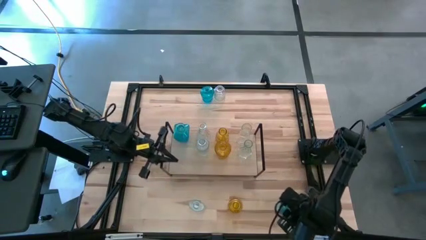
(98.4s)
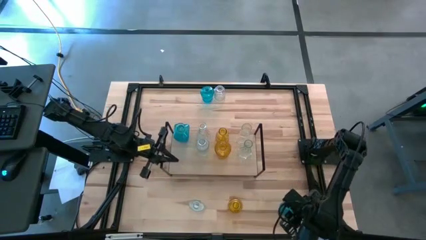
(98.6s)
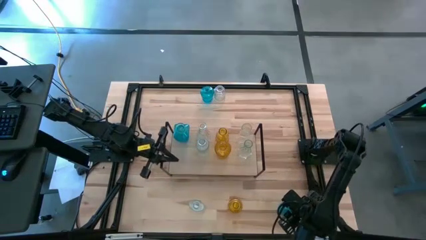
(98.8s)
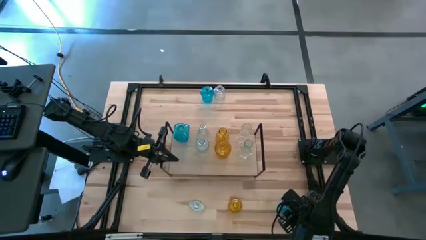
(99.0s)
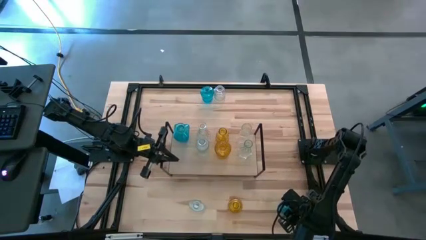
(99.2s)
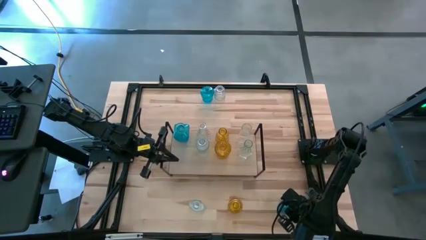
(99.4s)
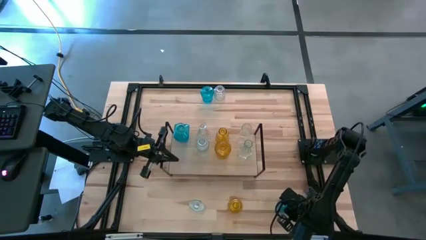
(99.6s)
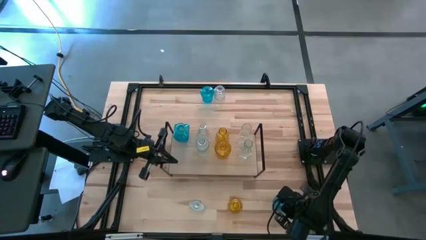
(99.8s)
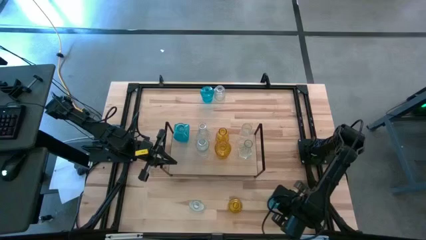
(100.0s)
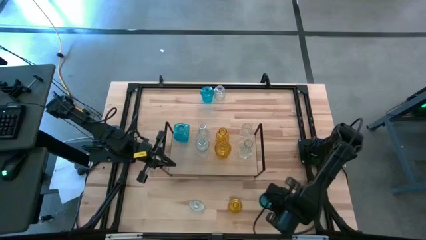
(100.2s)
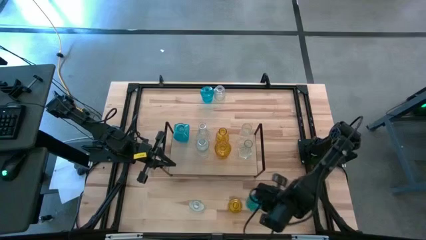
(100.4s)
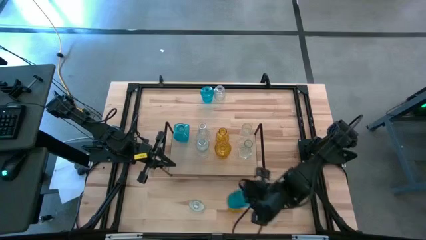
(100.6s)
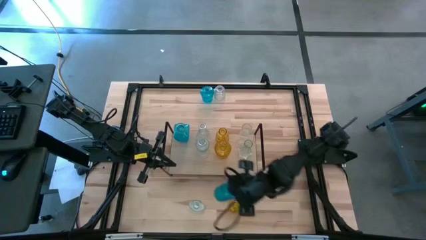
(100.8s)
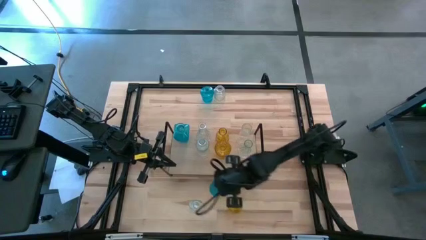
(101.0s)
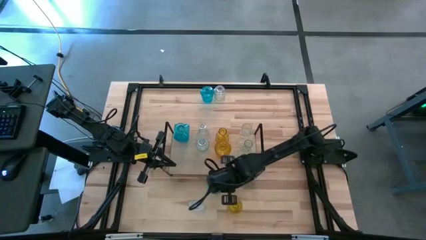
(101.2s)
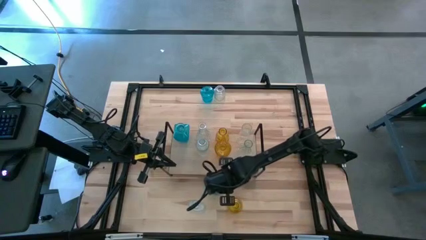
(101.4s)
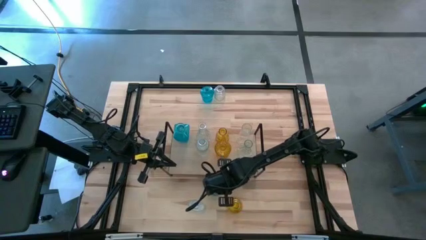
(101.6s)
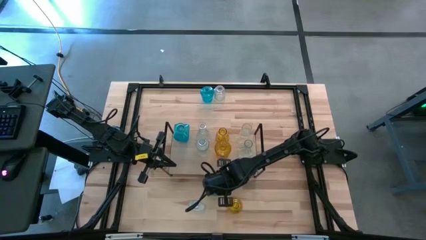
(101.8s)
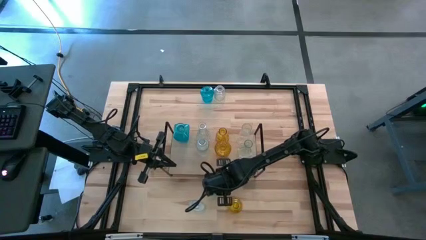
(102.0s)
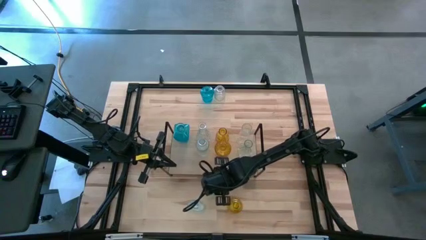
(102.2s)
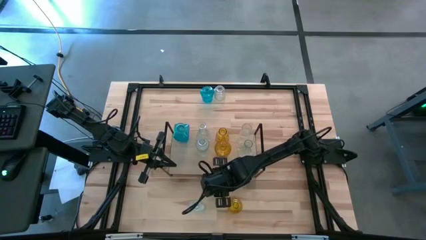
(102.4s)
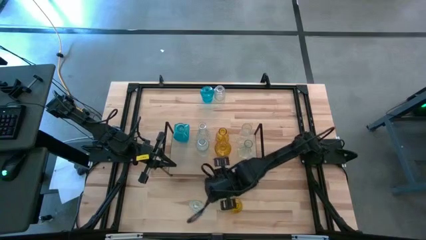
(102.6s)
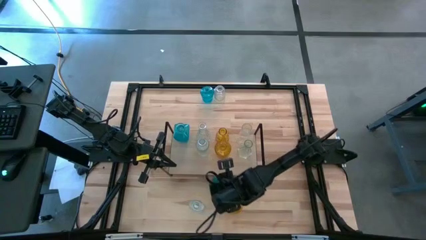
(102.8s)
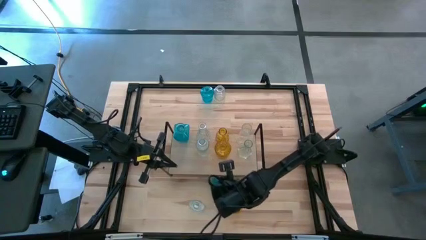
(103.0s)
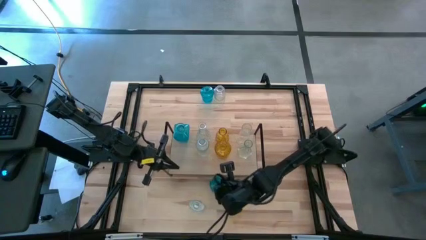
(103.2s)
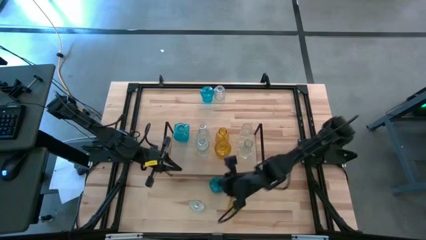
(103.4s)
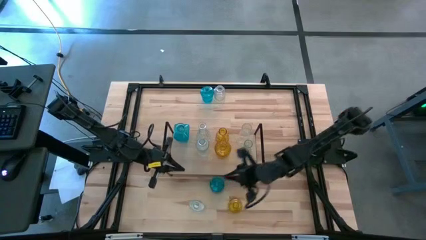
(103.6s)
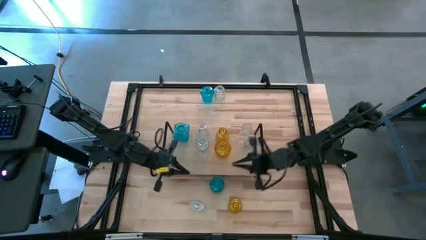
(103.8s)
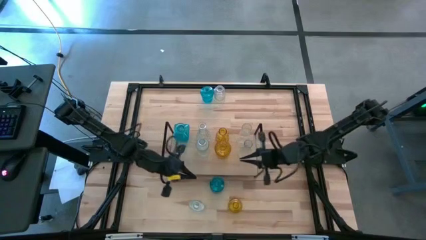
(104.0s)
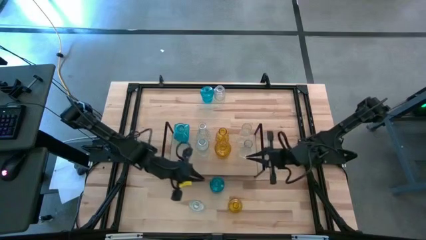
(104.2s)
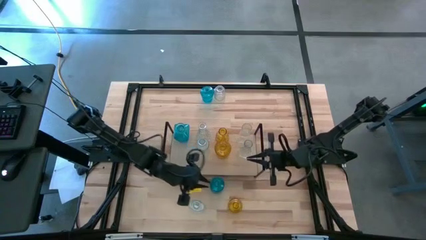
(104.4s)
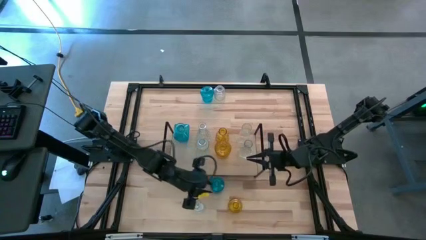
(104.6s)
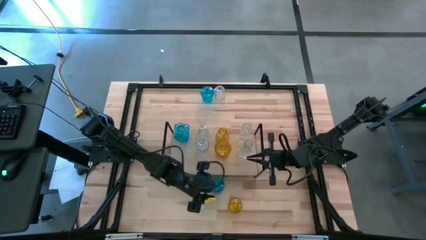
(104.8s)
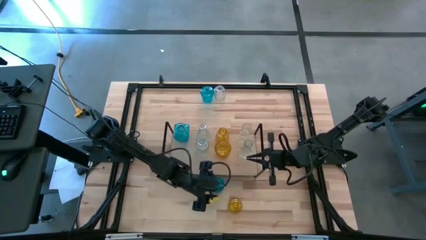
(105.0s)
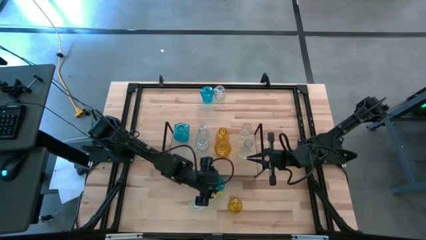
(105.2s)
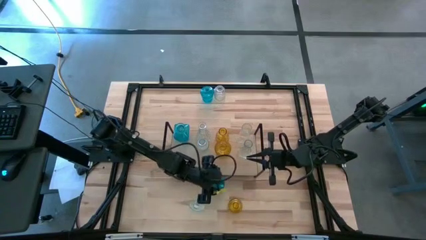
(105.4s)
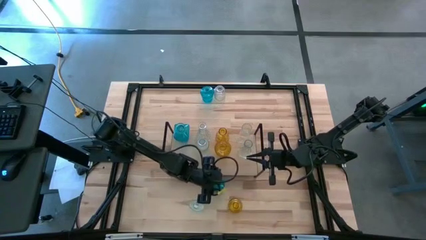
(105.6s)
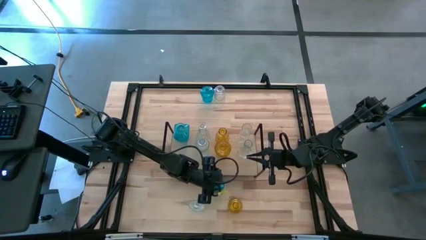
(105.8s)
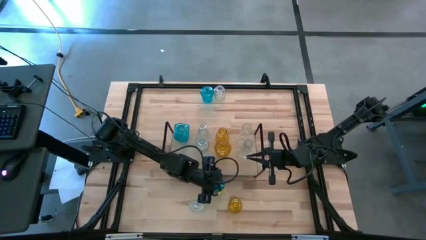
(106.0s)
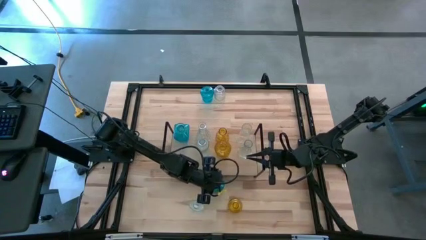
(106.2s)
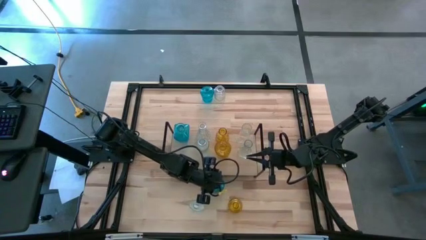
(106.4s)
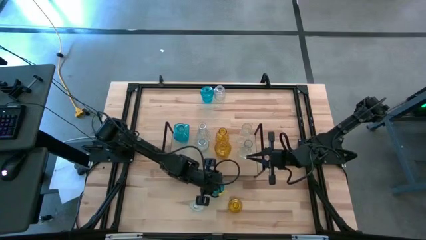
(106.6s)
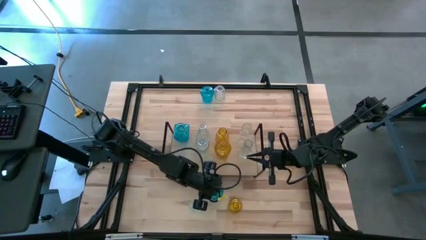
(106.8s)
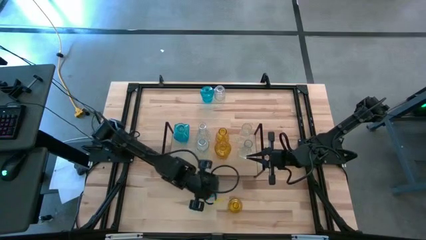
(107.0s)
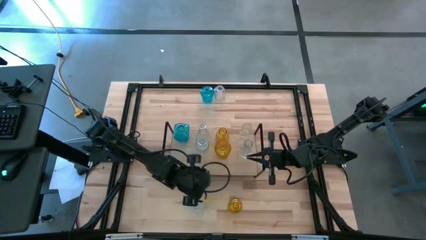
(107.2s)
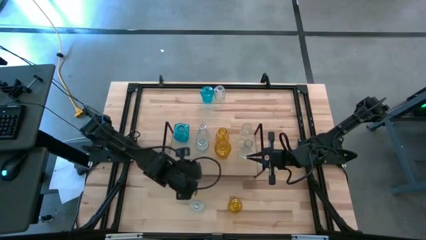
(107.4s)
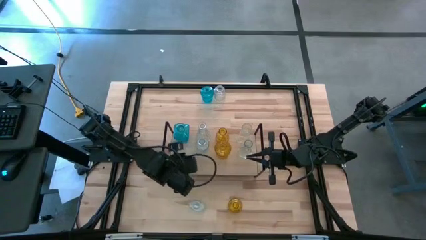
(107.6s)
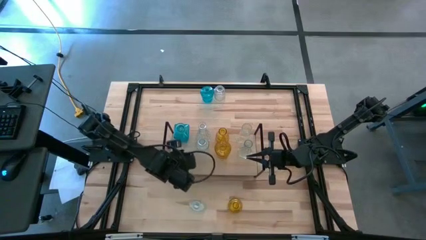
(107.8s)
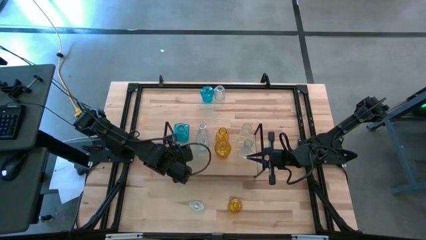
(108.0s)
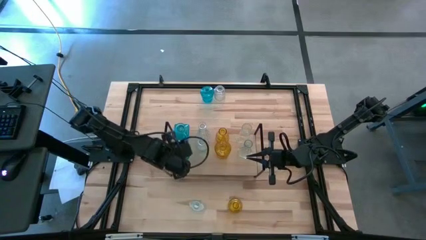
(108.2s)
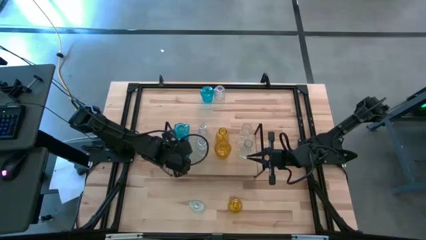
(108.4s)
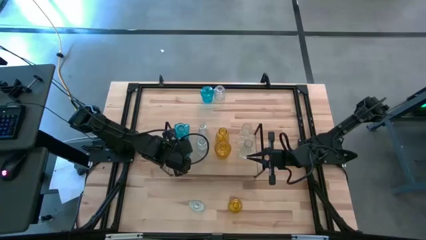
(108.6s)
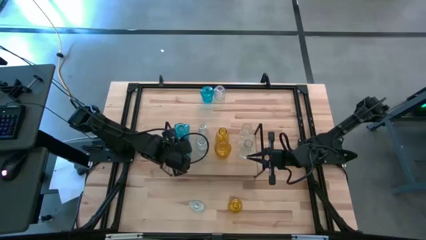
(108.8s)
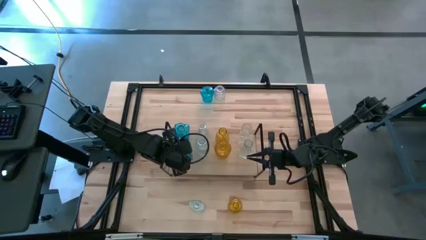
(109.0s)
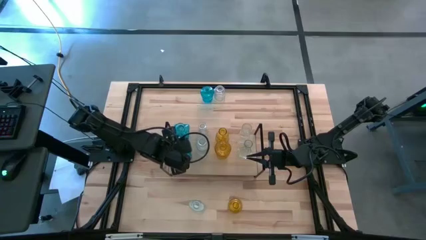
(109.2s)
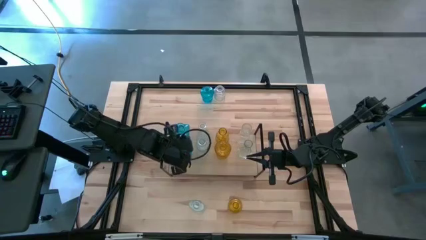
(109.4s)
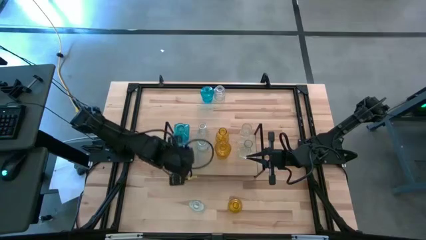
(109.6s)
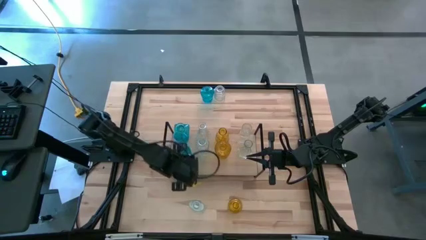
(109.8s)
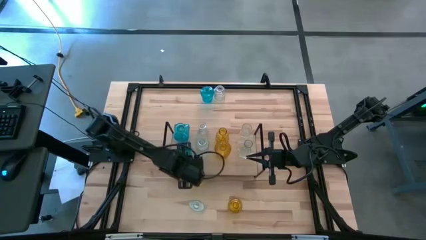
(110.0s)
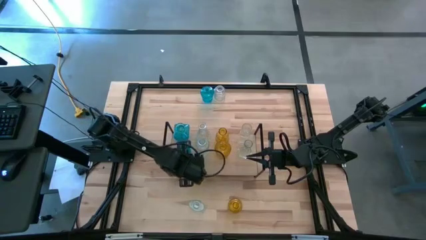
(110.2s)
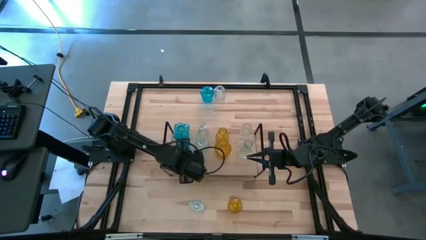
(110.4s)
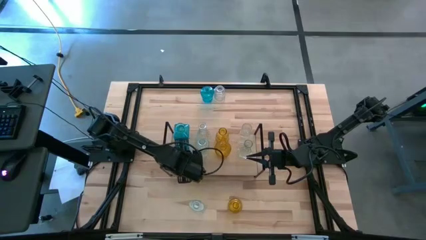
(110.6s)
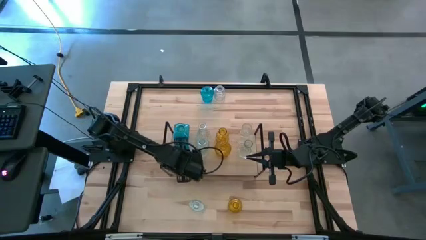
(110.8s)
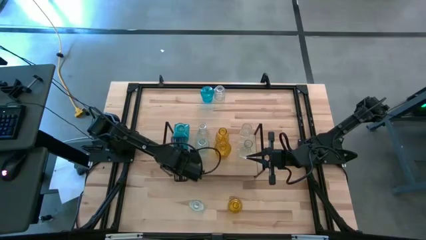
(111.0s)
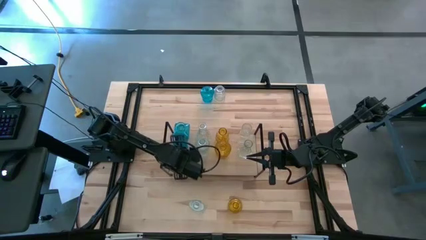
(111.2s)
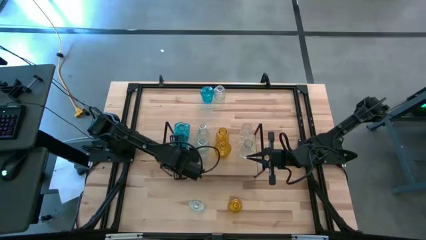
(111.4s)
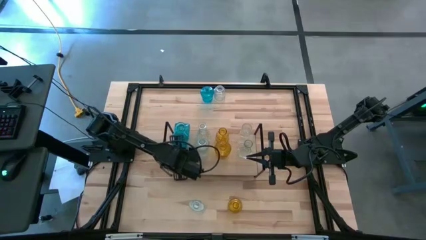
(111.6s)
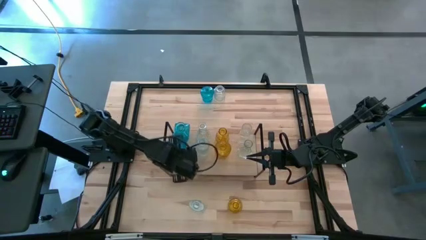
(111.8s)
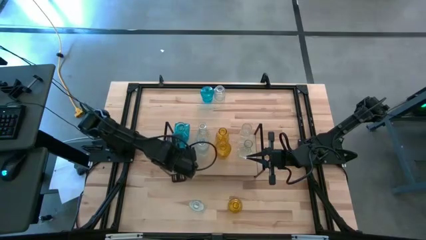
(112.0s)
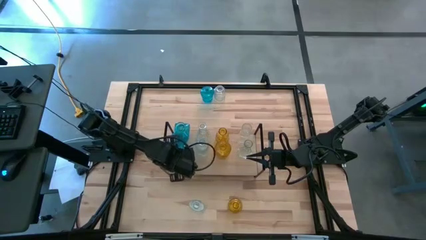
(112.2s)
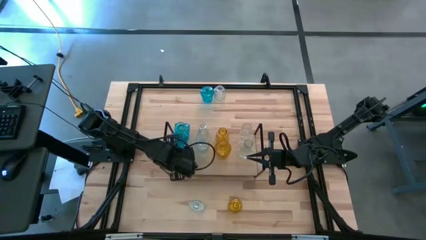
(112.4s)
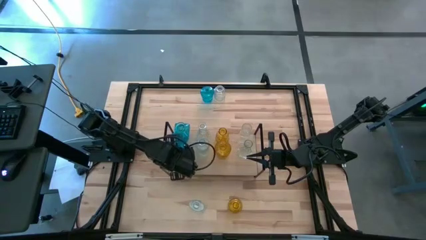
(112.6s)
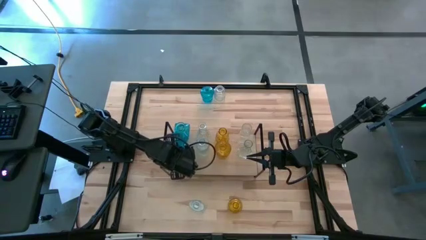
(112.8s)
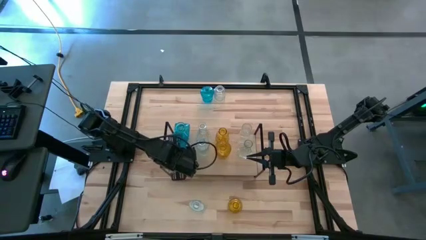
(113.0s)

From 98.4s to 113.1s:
Task: sort vases onto shelf
Put the bottom right blue vase on the shelf

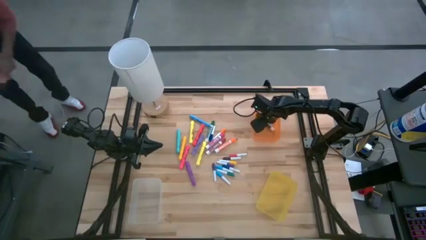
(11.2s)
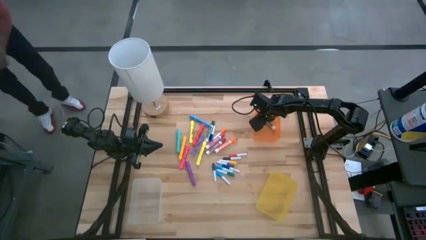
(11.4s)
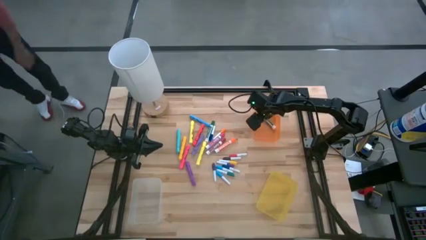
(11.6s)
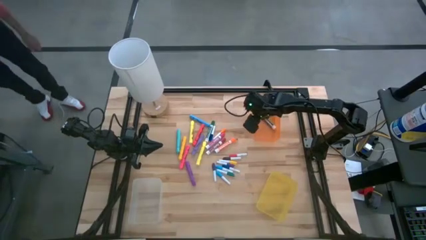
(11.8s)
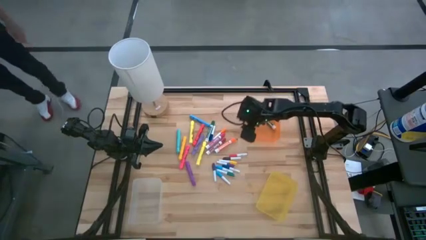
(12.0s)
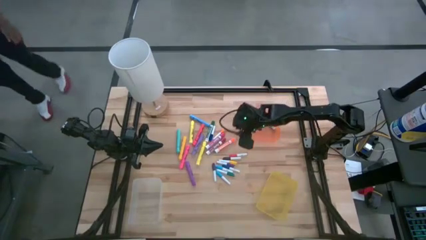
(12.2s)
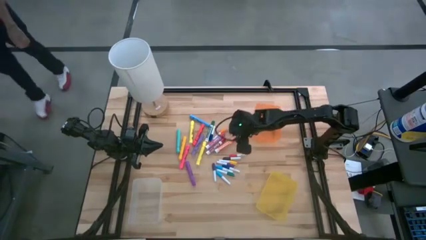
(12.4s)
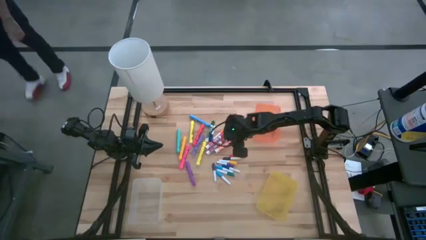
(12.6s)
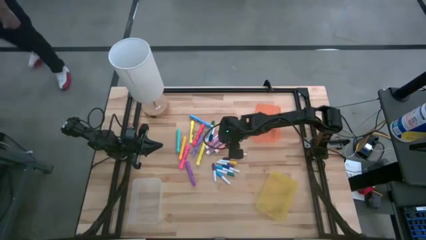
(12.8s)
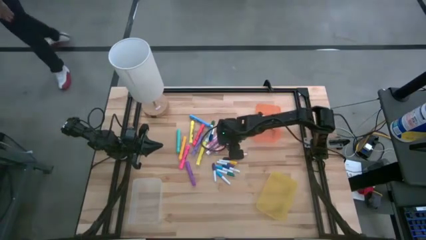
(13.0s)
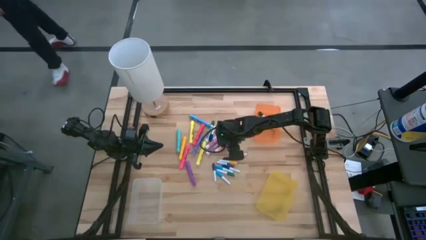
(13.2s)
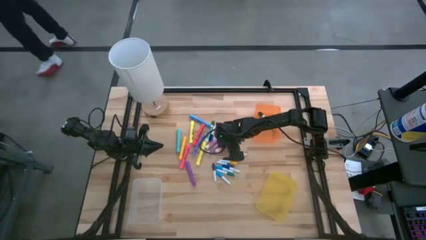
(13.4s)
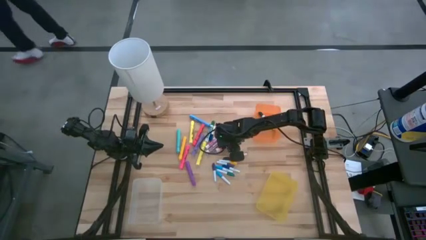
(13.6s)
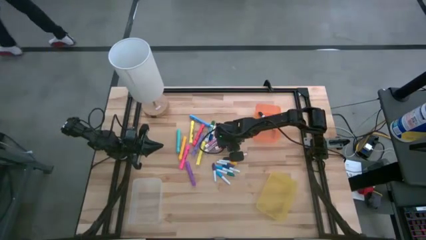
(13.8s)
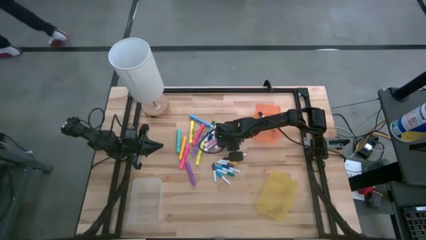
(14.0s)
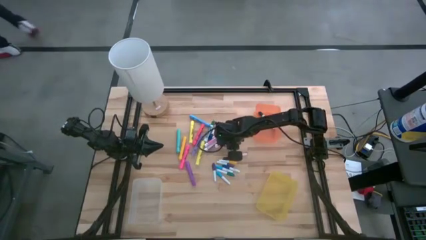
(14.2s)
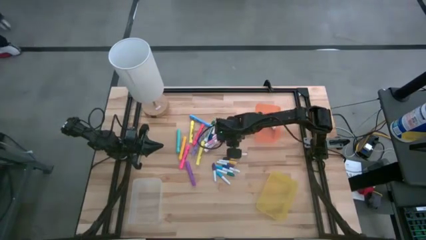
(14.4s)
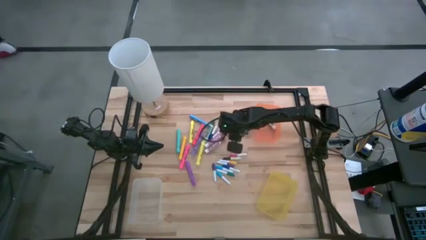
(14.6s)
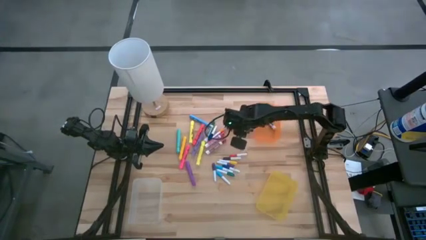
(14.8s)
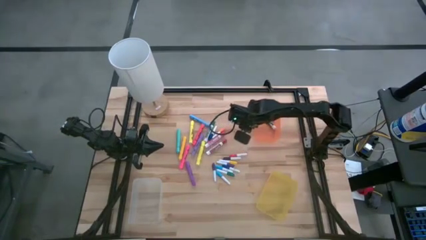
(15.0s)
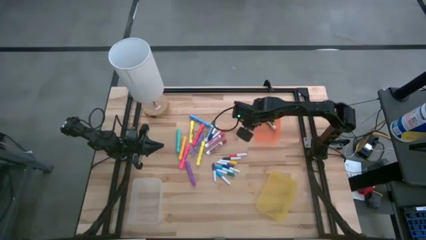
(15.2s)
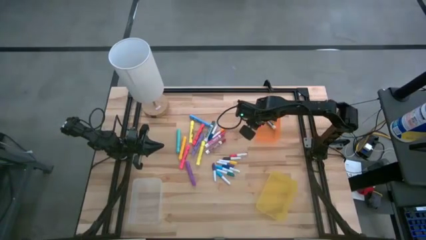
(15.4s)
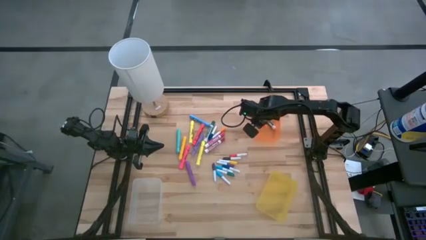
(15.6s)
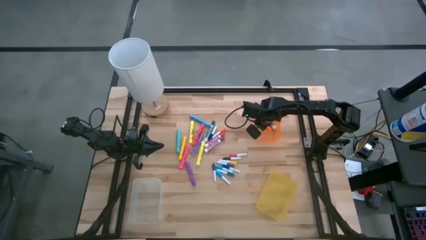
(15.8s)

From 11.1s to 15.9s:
Task: Pick & Place Markers
Put the orange eraser marker into the orange bin
